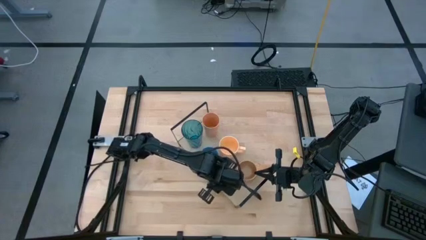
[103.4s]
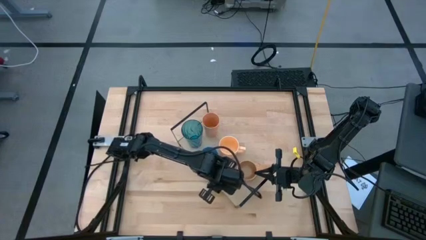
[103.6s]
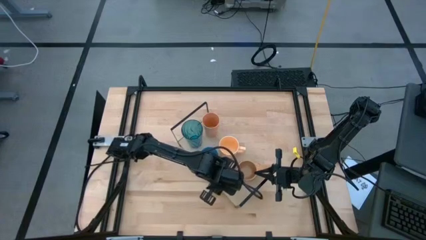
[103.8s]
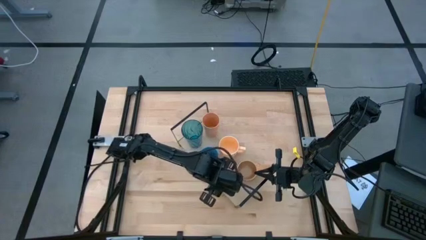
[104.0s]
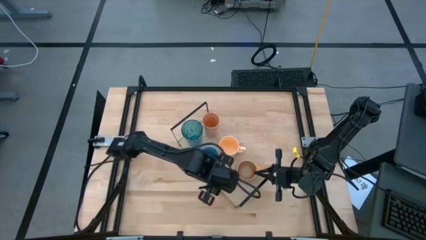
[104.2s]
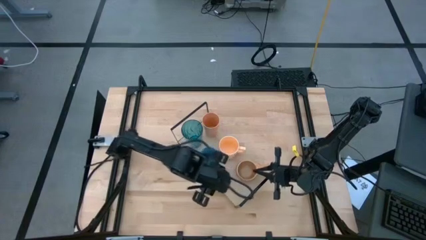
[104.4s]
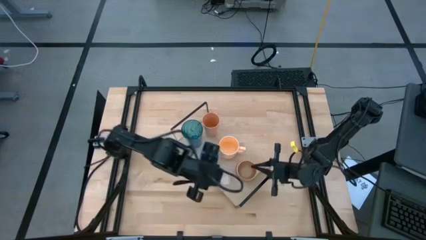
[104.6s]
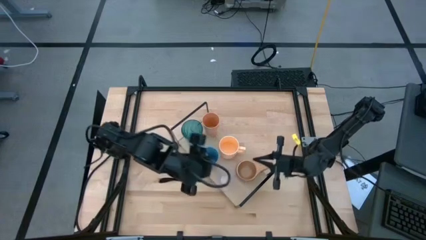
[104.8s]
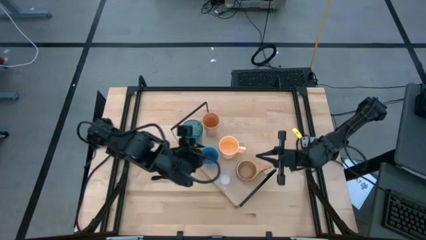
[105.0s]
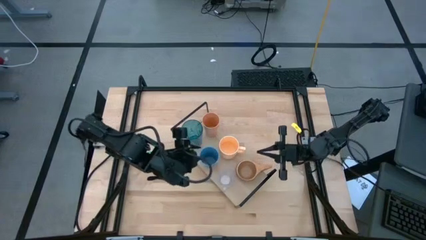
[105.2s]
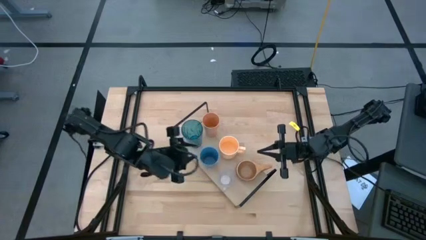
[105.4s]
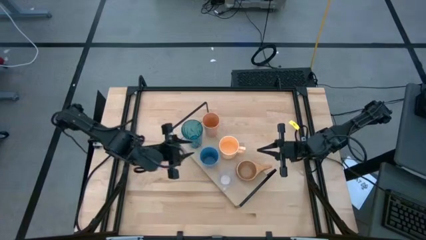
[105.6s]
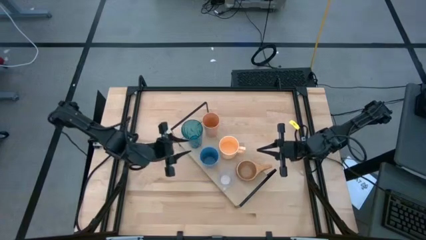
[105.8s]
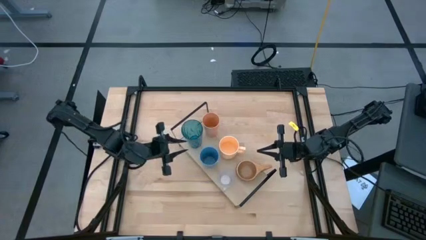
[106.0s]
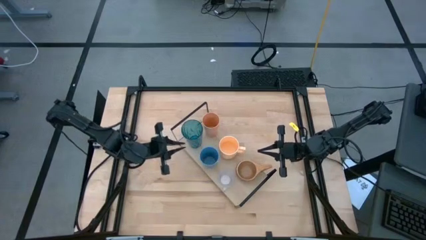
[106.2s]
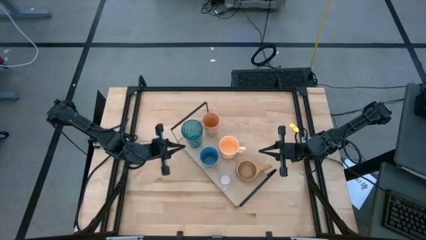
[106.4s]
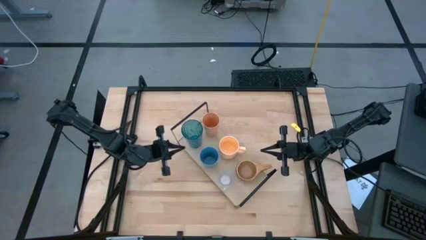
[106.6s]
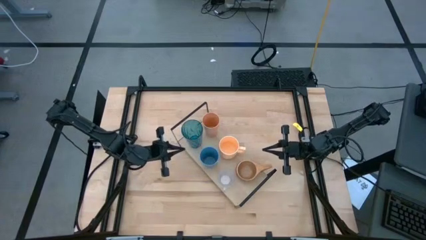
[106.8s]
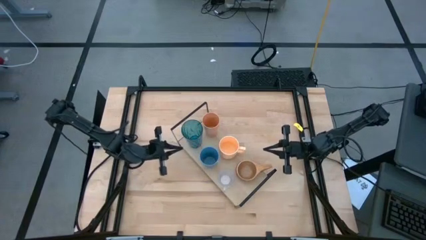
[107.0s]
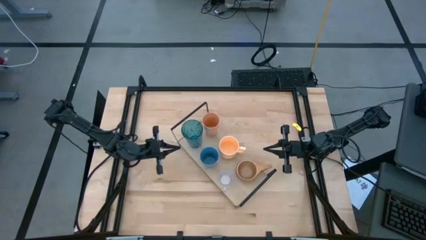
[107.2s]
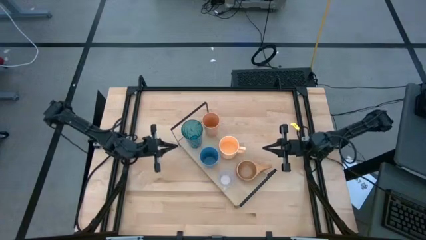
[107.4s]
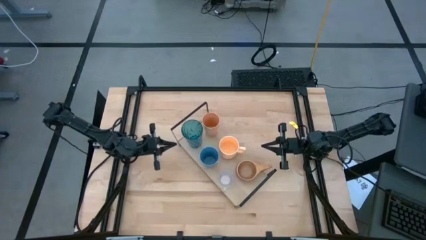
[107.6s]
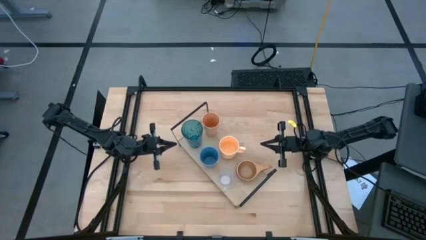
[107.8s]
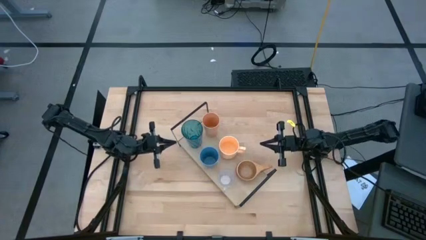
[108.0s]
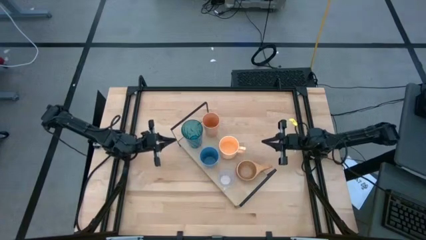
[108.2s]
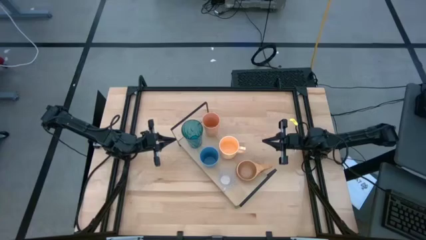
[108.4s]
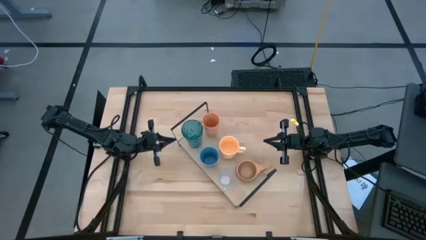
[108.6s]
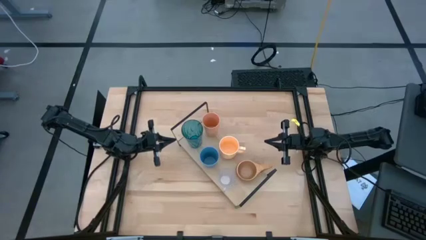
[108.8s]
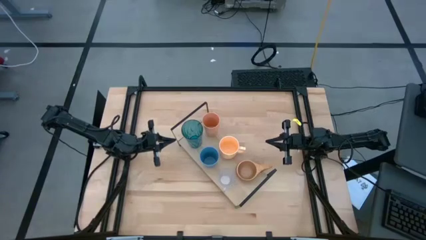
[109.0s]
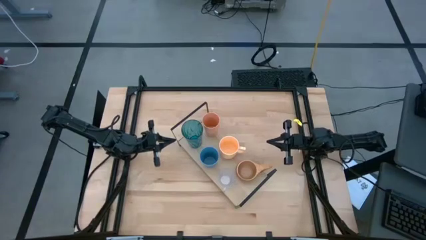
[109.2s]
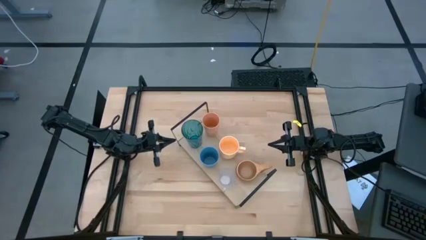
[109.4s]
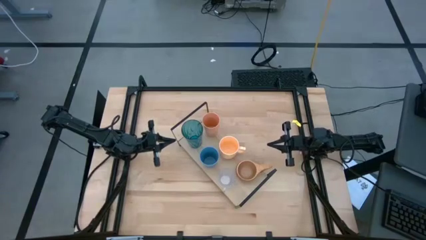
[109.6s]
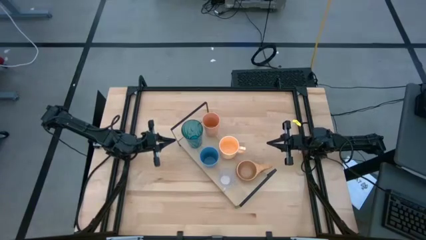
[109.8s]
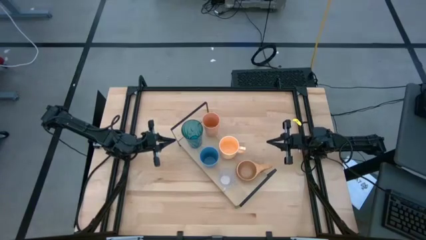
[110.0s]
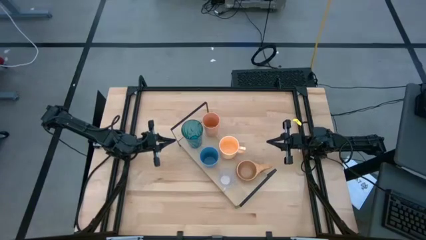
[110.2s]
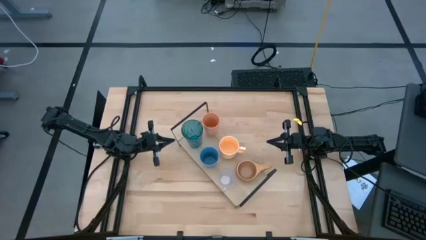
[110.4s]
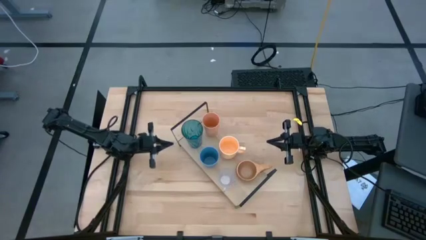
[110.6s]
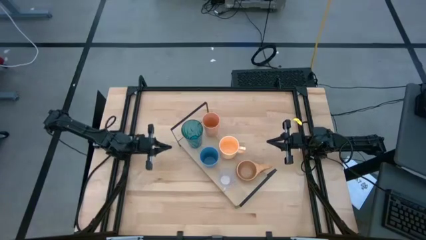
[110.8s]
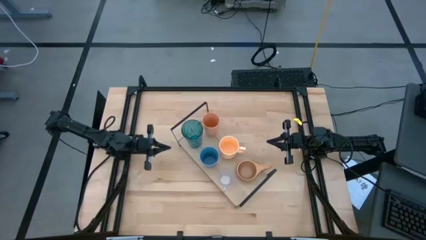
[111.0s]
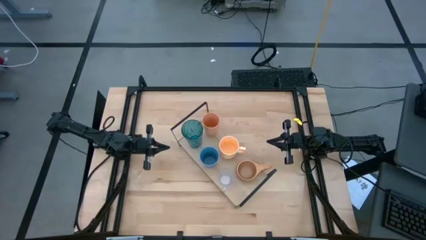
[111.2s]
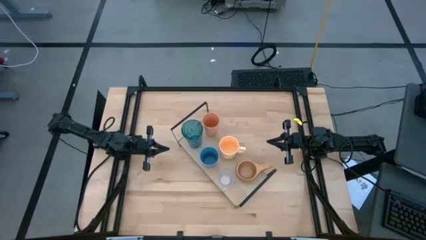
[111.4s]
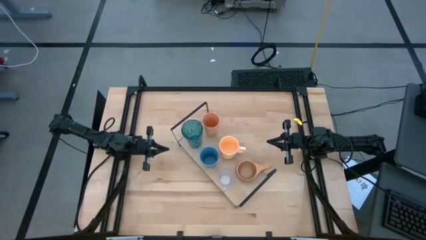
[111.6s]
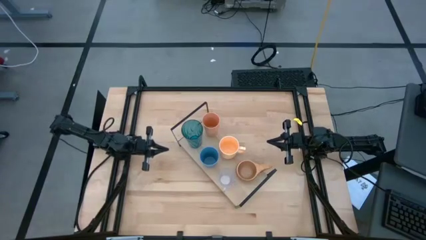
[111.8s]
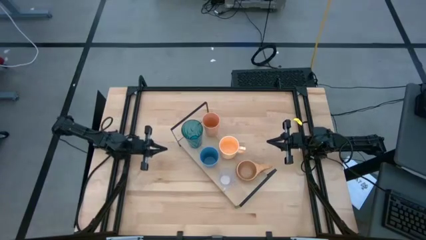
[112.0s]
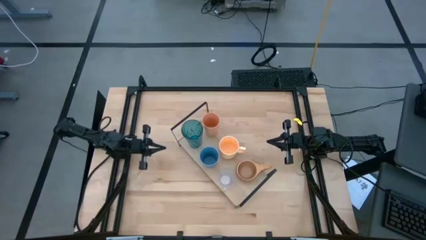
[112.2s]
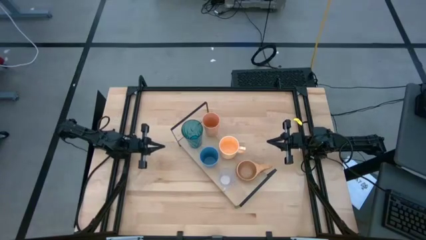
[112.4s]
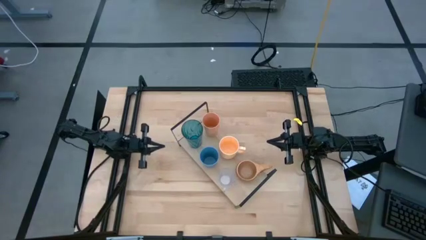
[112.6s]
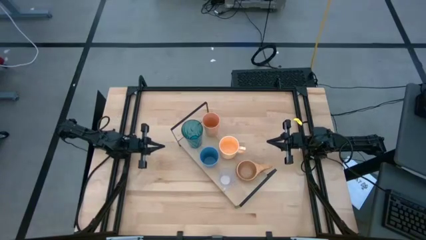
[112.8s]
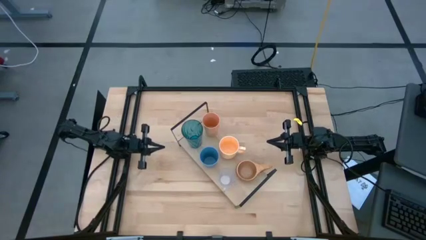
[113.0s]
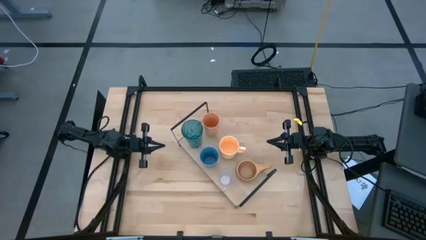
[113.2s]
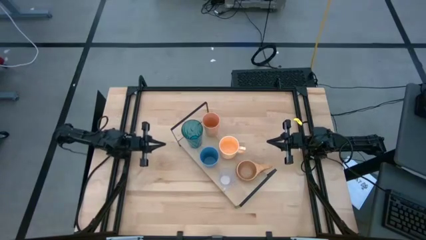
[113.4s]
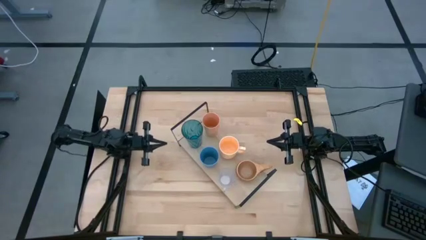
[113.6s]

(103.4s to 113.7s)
Task: Stack small to large cups/mugs on shelf
Return to Home Position

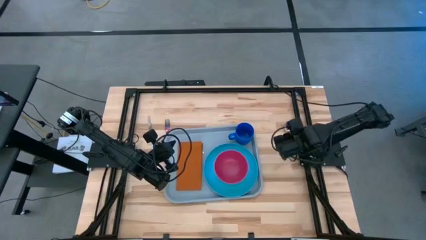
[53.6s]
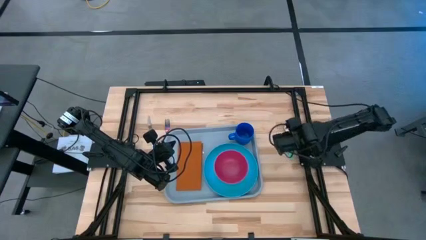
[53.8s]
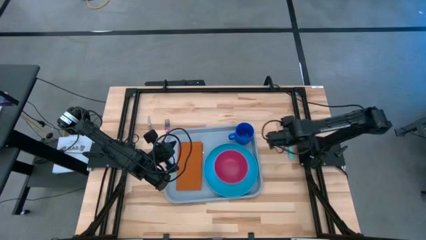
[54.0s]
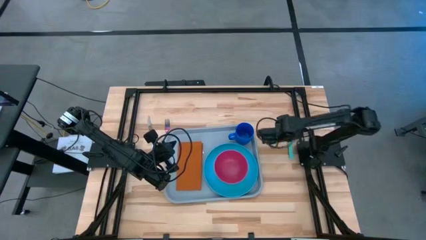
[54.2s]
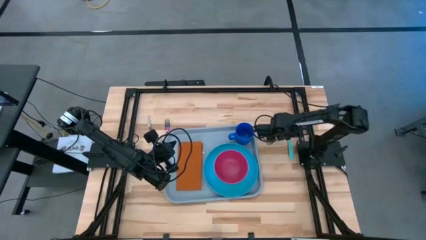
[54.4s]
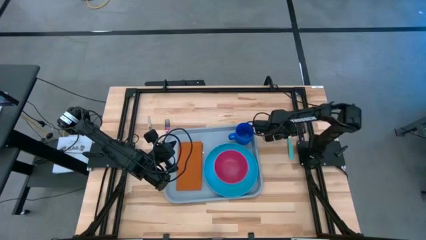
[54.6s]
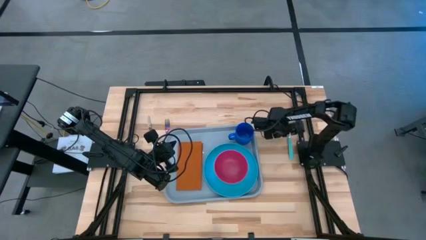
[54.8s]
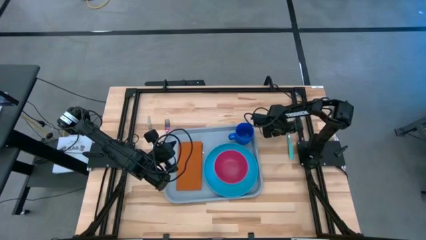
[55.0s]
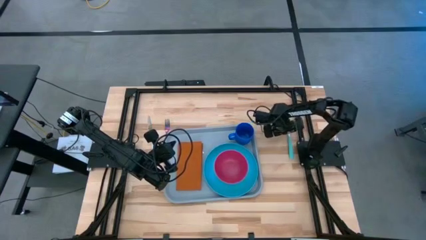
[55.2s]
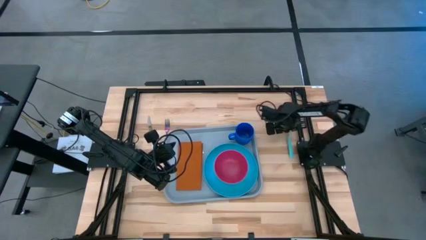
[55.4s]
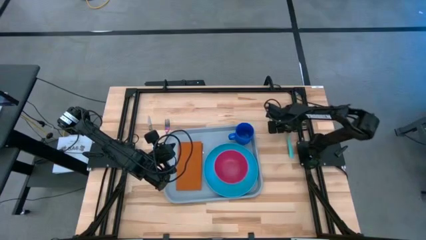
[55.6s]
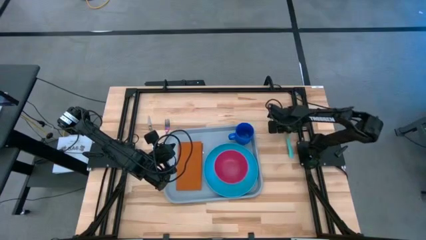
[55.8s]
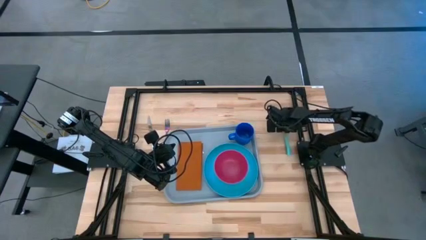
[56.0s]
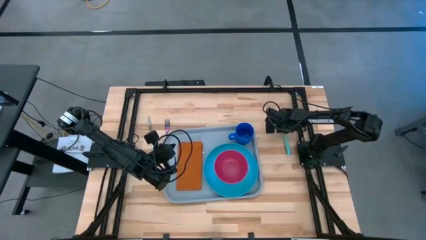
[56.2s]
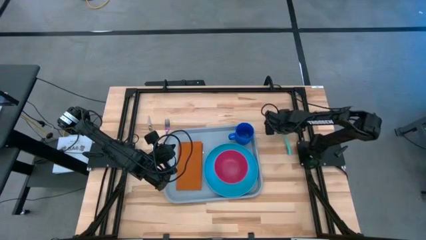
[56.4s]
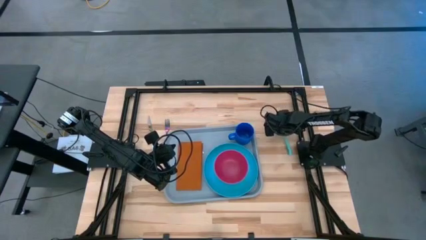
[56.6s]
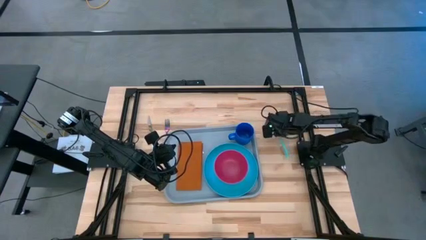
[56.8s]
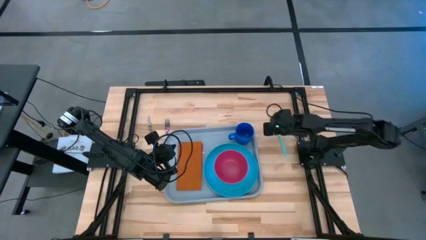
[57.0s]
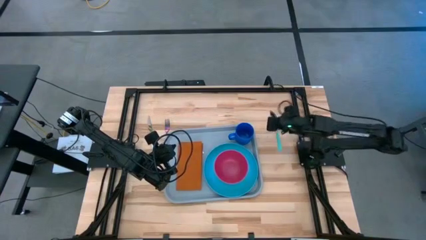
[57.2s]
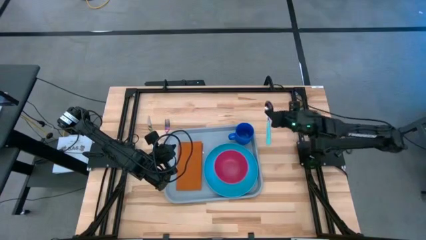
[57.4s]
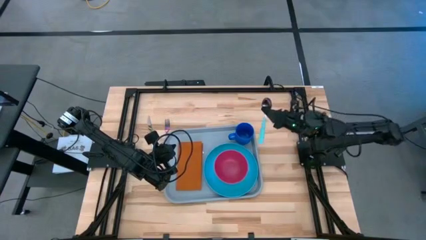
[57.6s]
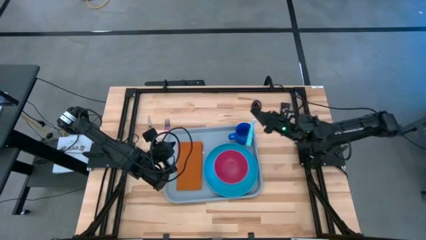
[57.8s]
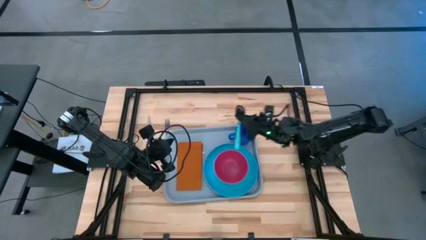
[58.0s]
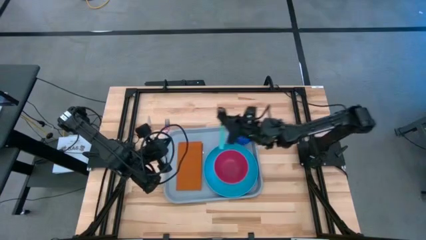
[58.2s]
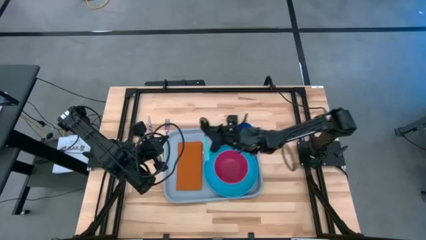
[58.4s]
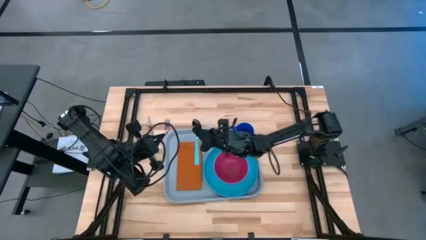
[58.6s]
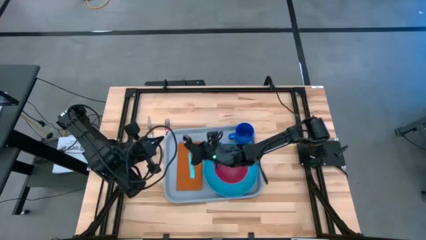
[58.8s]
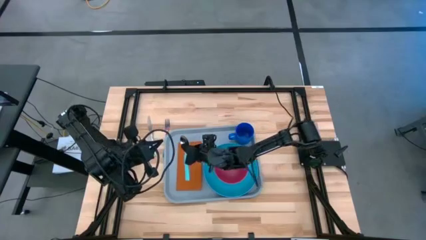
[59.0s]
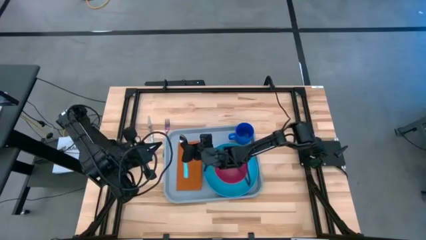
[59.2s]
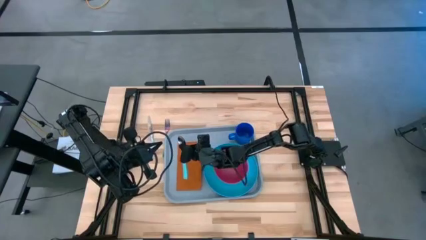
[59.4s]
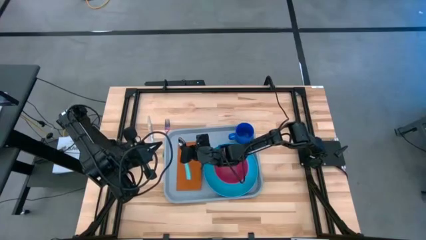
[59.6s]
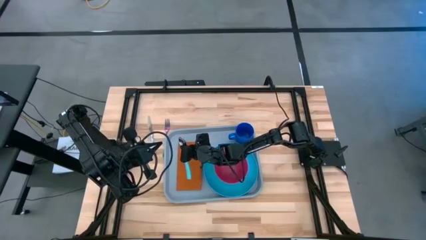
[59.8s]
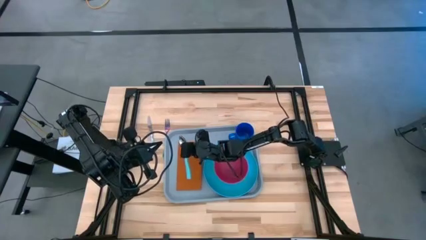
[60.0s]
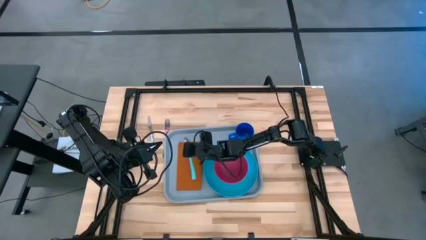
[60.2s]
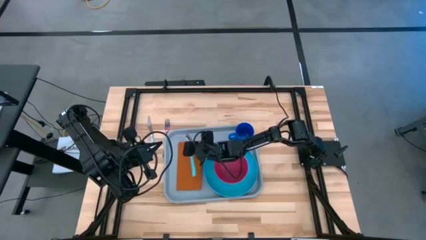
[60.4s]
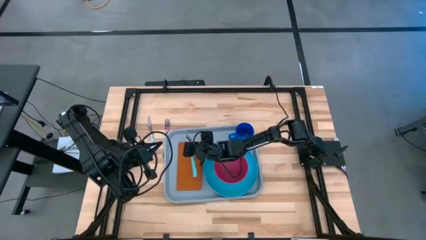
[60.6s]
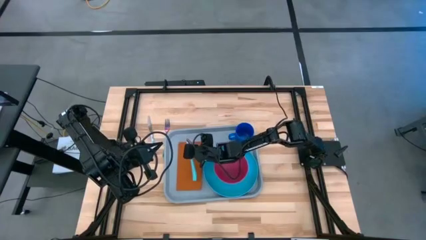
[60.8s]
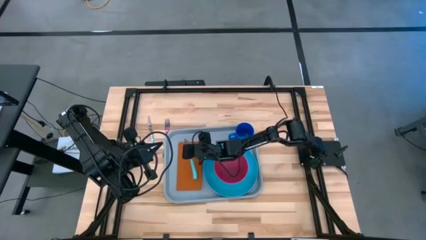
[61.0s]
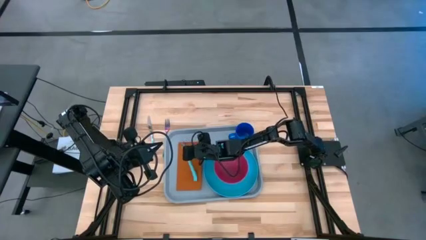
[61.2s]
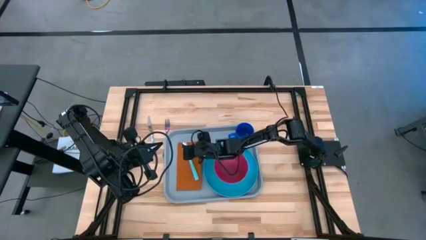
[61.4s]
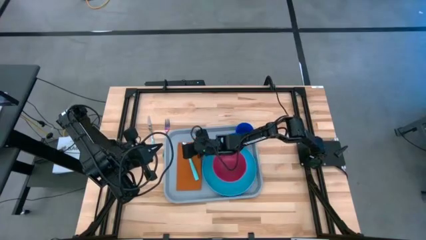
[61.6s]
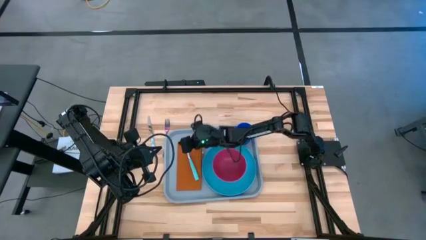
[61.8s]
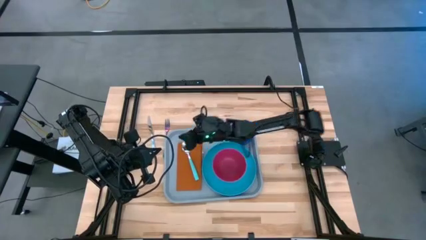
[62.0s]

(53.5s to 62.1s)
Task: Set up tray
Put the green spoon on top of the orange table napkin
